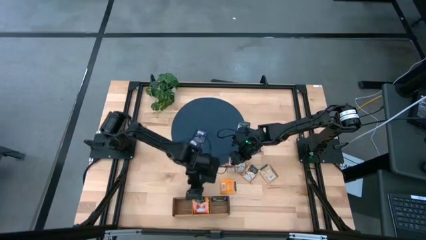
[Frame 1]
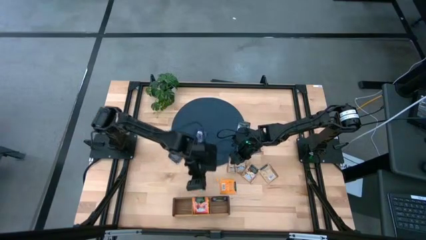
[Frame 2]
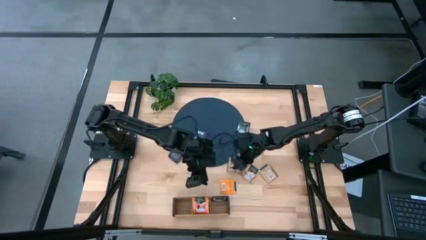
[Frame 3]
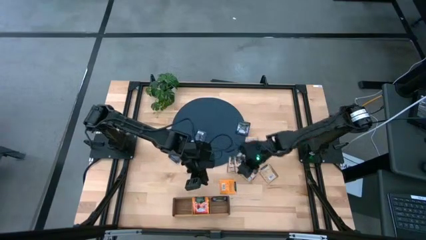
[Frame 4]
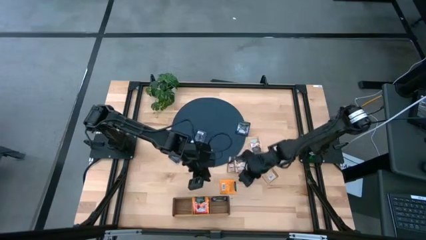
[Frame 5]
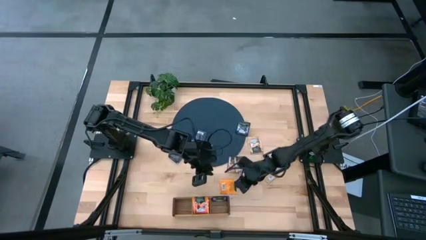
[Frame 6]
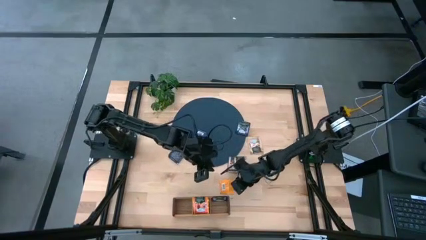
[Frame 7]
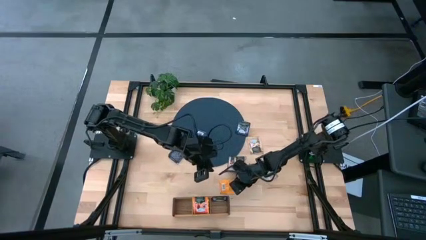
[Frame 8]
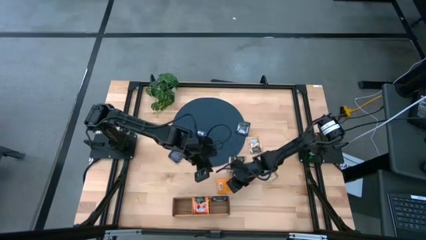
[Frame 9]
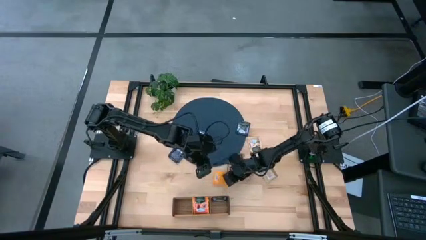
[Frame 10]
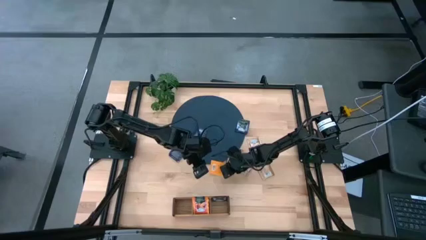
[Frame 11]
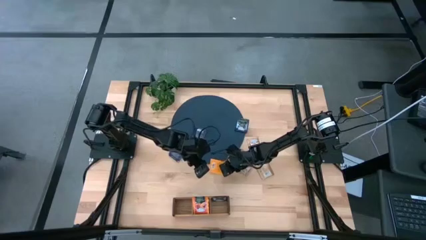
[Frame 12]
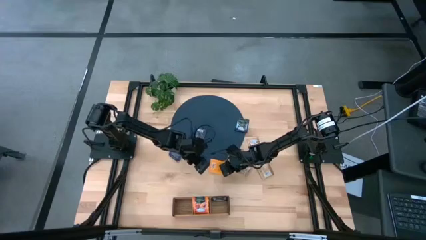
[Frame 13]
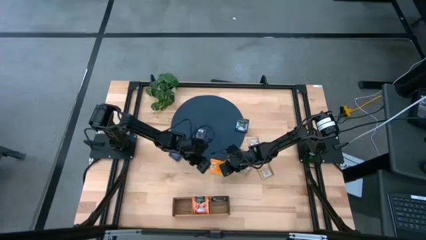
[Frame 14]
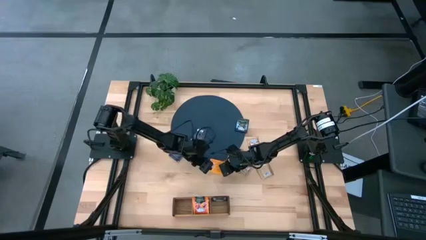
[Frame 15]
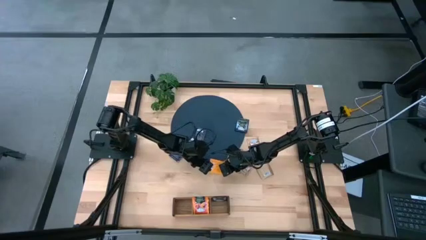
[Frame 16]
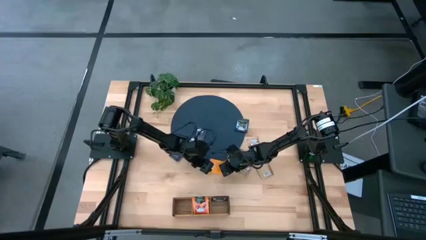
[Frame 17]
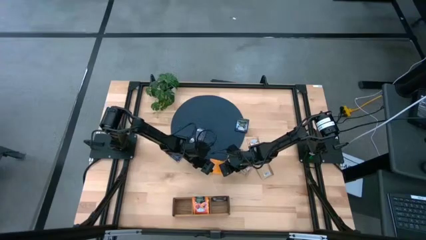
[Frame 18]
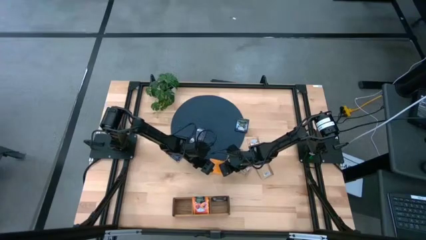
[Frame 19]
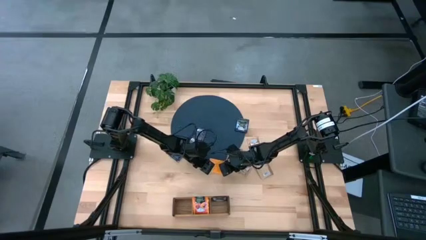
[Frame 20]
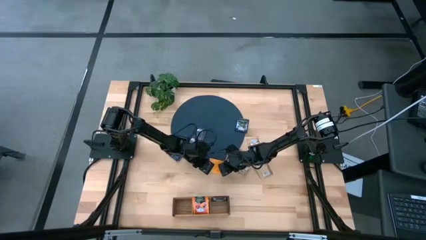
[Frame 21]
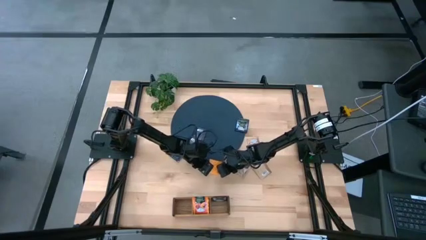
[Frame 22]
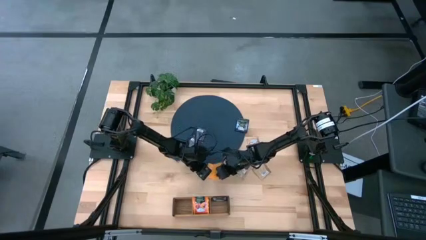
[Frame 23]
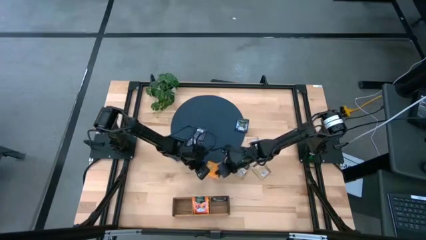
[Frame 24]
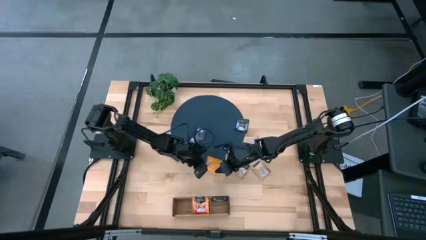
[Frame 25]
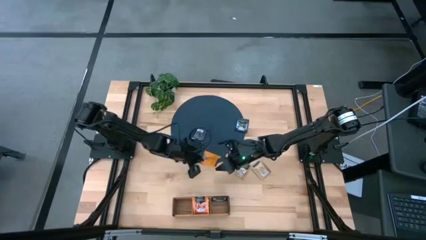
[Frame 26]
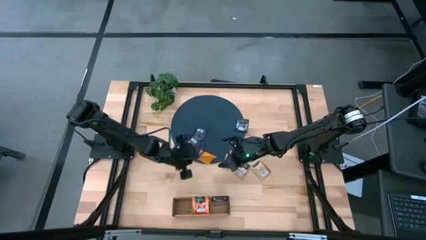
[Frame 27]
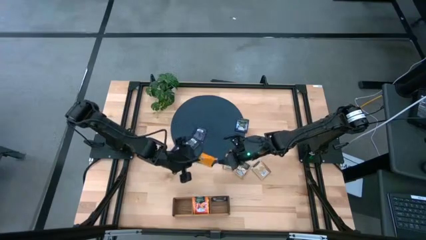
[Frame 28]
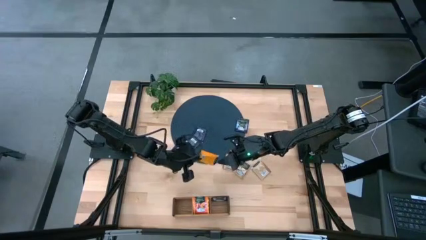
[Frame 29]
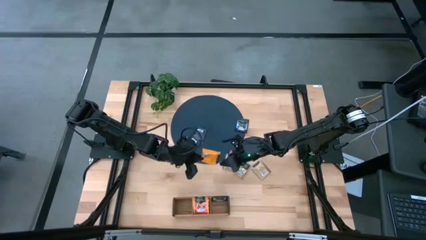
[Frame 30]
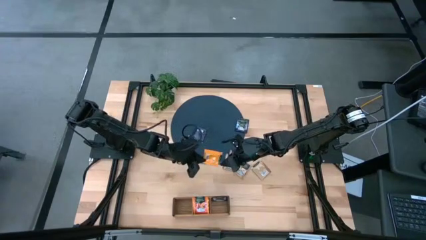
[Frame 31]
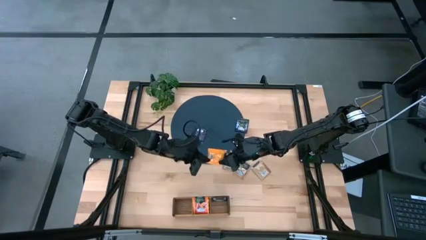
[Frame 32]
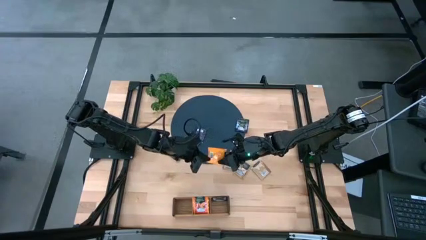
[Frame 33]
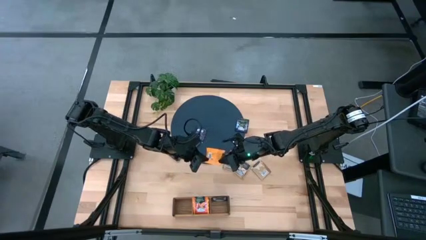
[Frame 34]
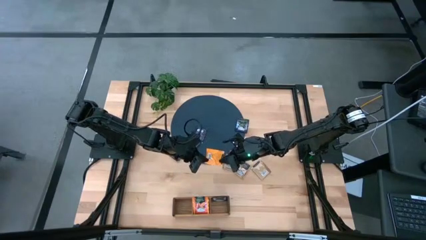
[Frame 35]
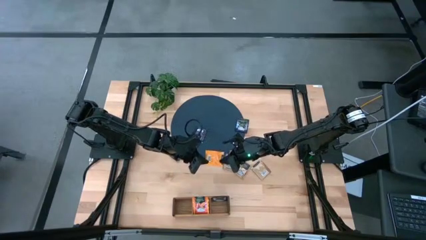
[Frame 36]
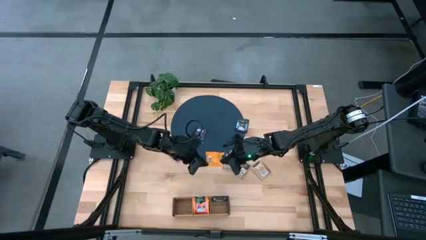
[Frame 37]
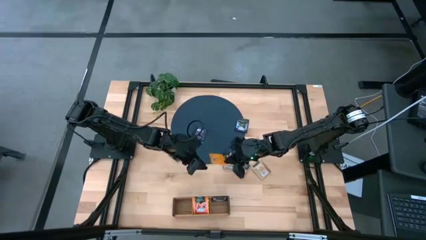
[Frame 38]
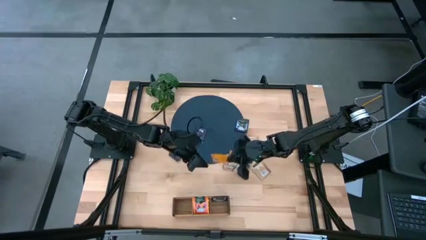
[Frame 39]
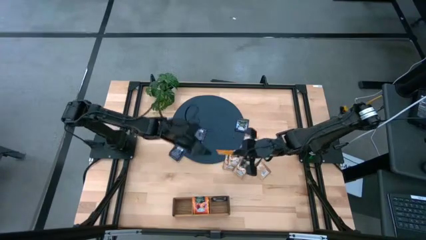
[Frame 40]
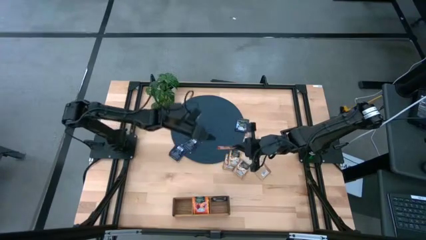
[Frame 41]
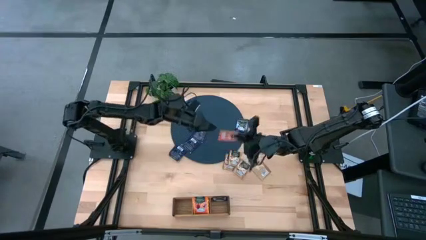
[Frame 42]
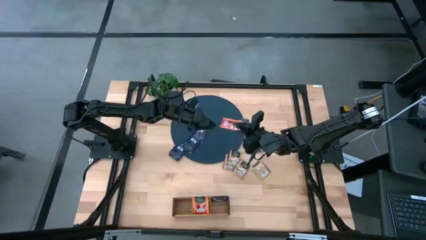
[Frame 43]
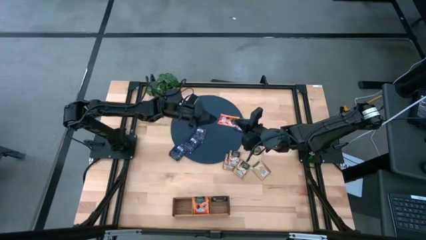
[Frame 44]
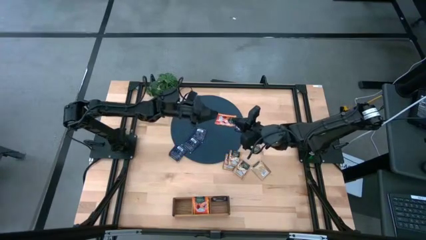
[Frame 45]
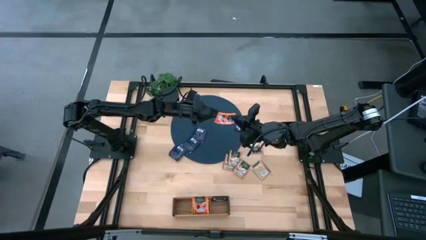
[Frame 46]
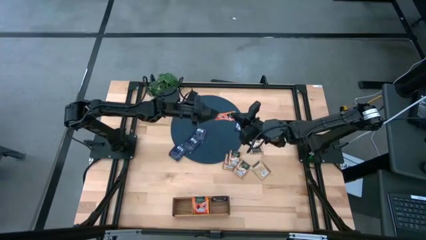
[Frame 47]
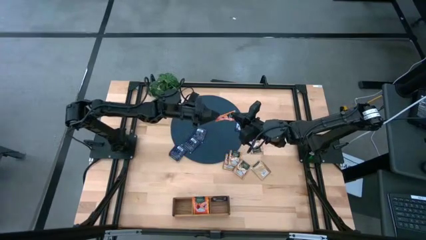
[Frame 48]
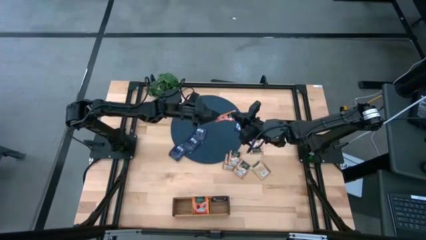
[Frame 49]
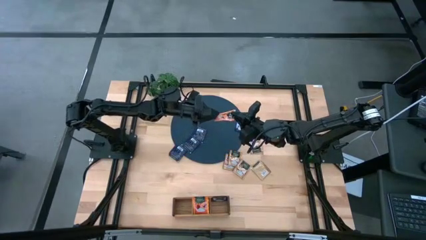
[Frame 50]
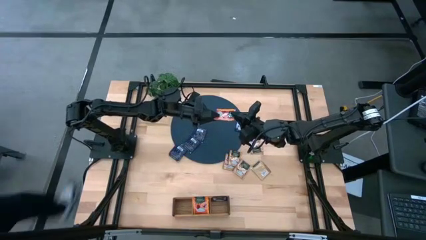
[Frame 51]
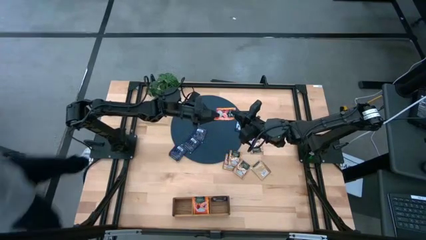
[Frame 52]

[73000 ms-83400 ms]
Task: Pick & Place Tea
Put the orange tea bag into the middle section of the wooden organizer

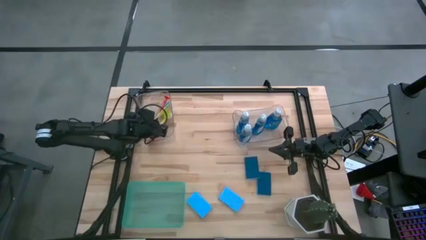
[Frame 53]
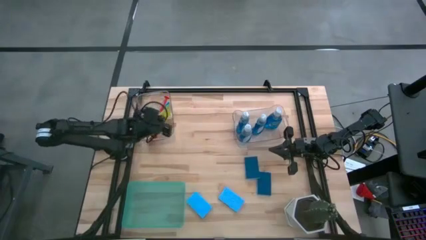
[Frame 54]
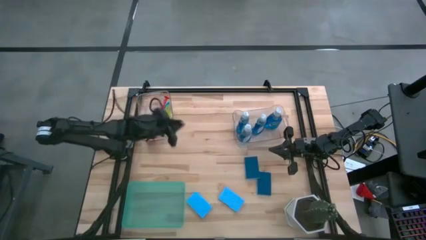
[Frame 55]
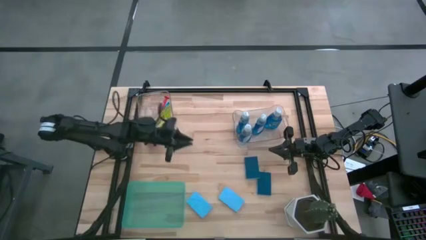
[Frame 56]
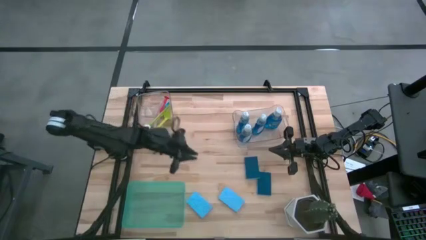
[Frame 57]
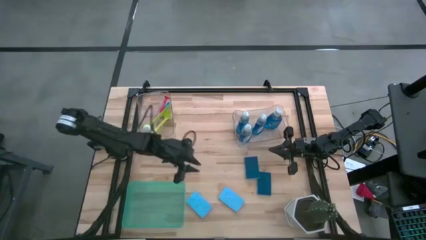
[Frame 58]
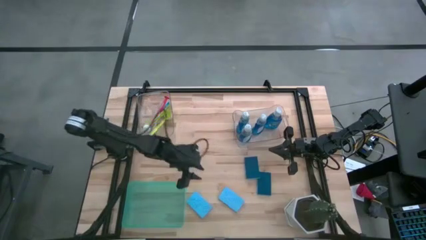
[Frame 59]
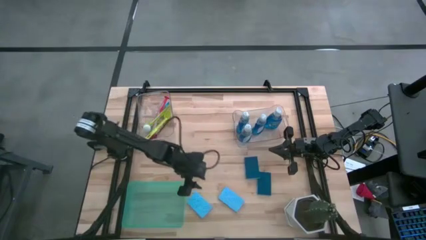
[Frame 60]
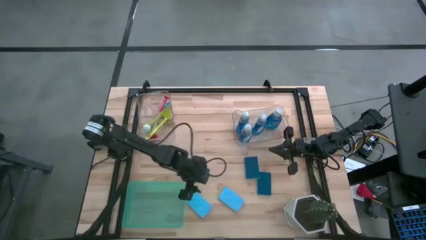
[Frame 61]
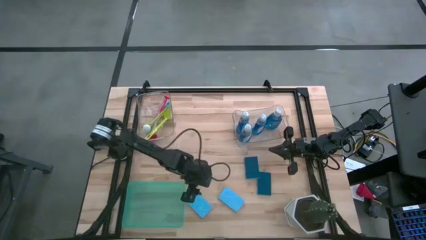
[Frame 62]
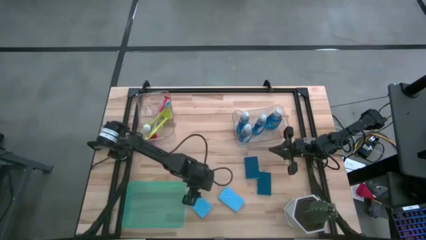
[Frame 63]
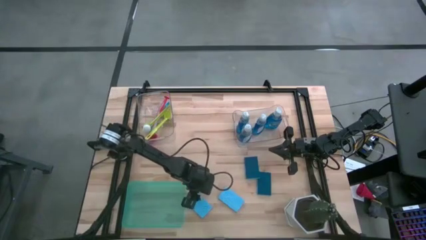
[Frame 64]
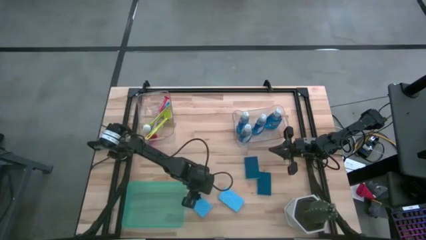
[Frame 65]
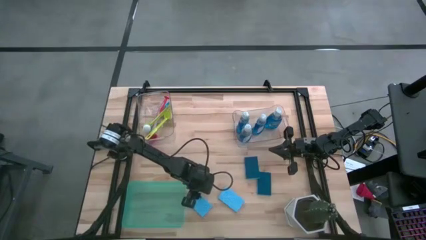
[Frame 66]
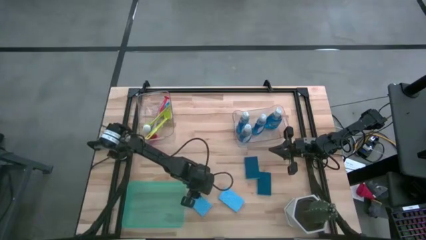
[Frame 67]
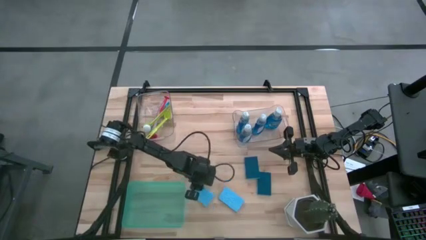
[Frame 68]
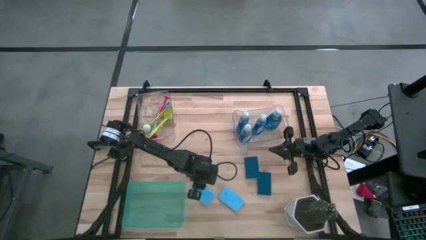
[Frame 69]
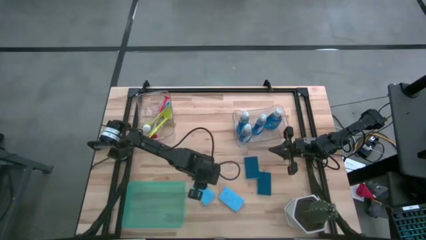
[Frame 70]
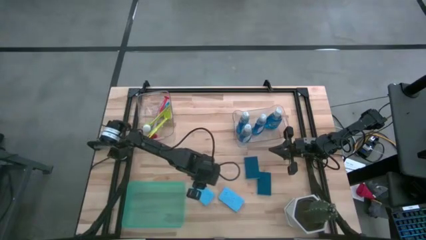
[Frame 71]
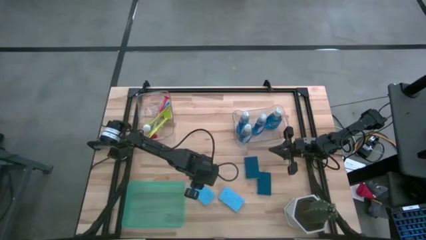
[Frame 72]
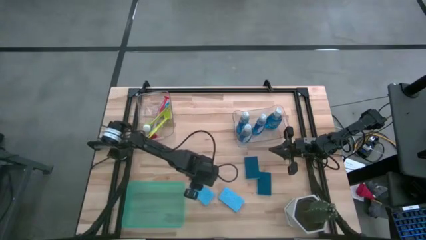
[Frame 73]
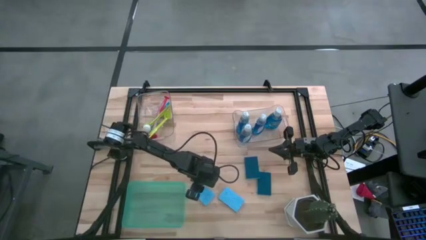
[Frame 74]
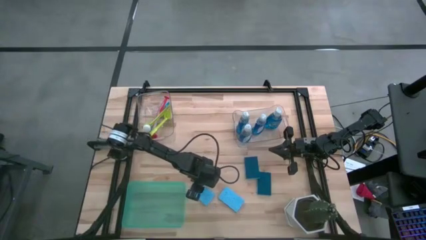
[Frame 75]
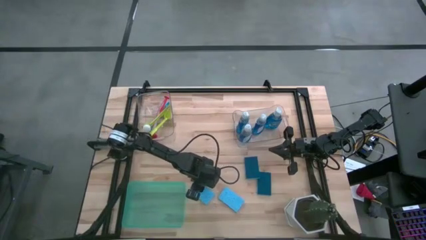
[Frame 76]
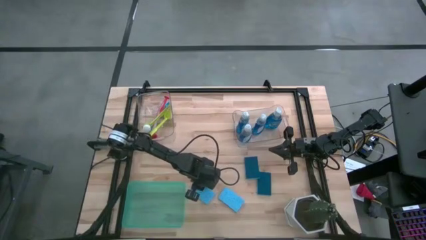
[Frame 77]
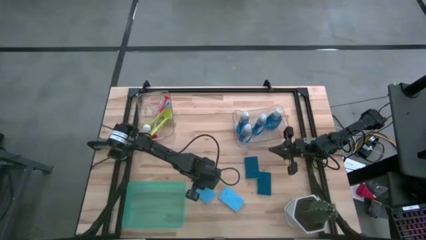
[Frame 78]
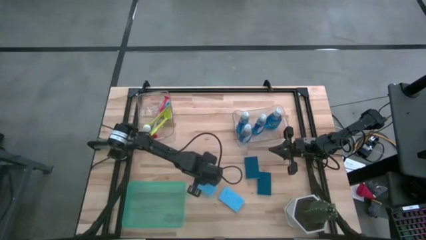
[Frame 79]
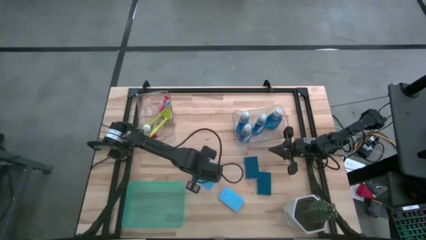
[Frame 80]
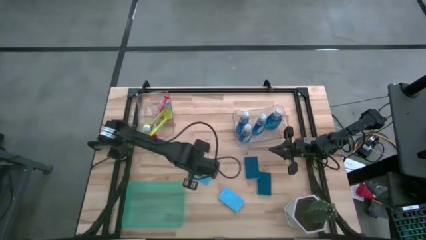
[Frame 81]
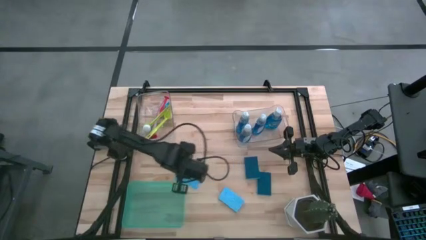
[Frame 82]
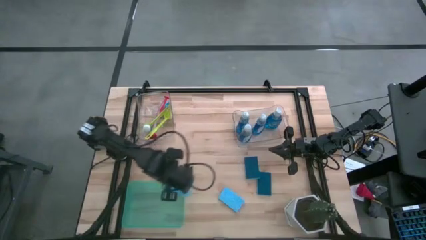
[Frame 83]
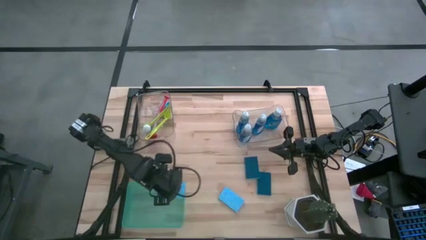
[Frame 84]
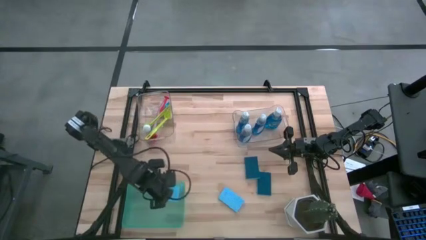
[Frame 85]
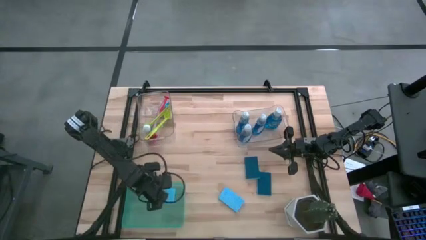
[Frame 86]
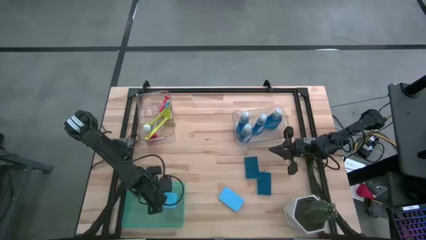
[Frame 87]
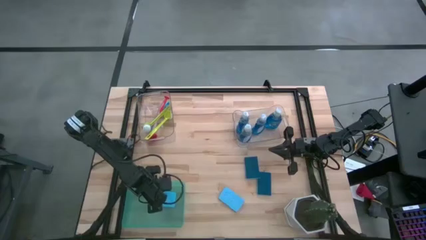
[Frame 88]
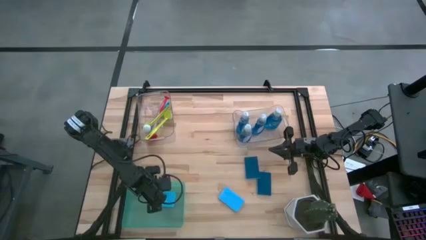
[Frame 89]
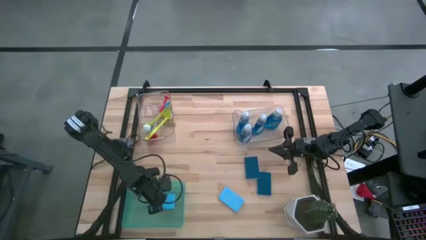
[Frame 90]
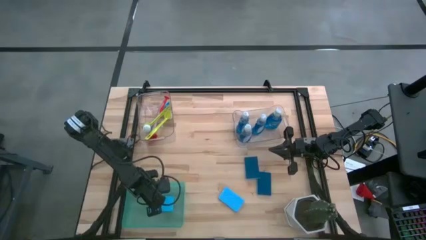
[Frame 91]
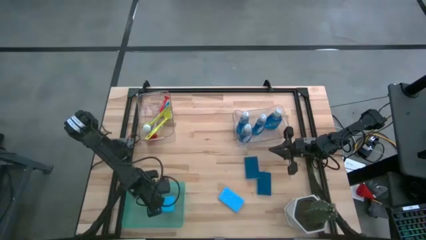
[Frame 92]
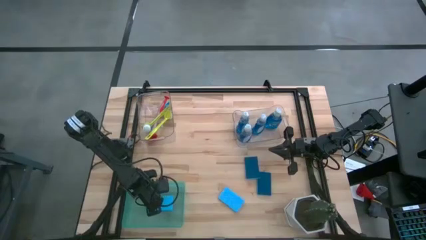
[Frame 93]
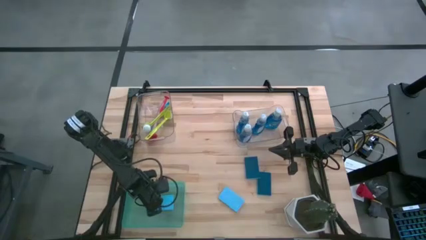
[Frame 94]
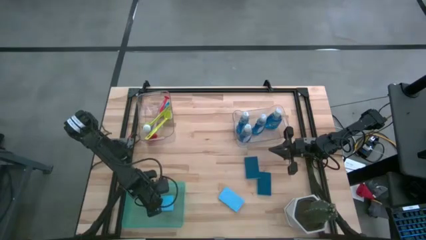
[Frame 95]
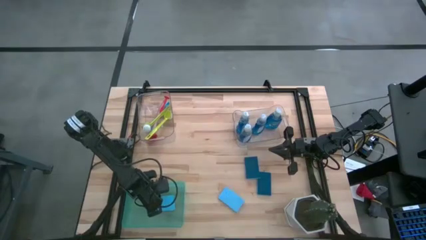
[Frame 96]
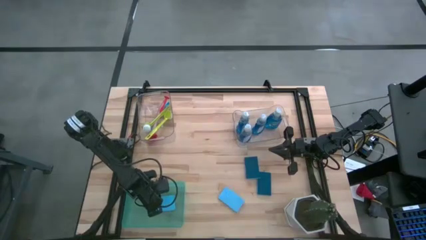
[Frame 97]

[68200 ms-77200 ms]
Task: Pick & Place Kitchen Sink Supplies
Put the blue sponge into the green bin
